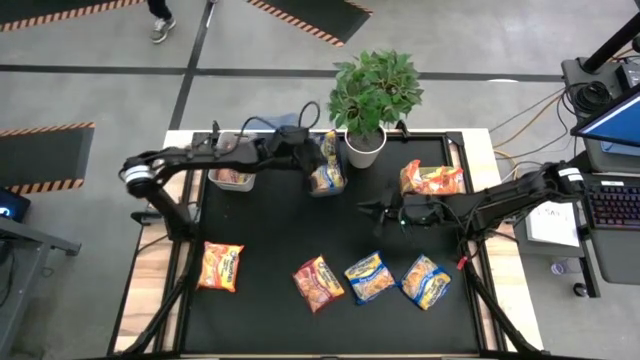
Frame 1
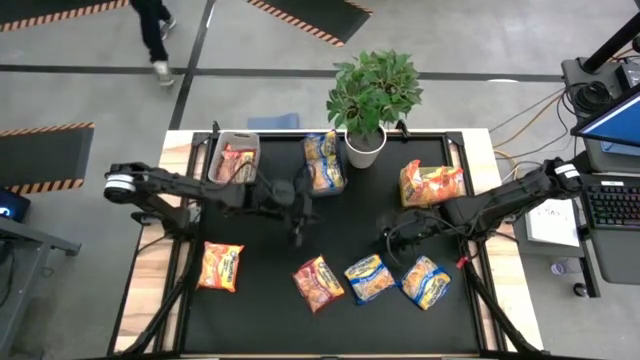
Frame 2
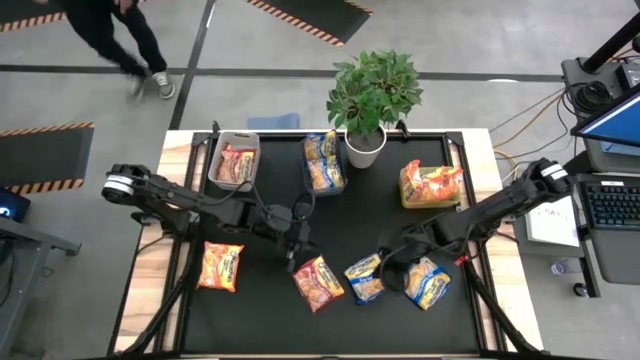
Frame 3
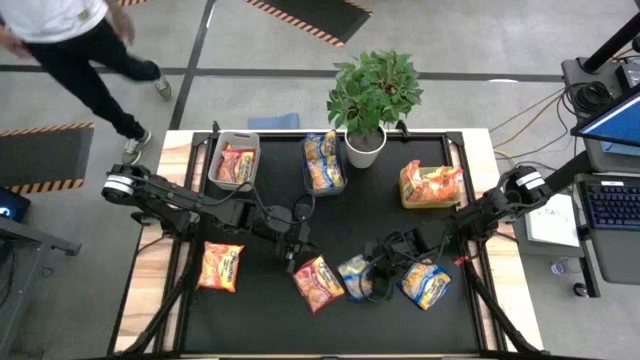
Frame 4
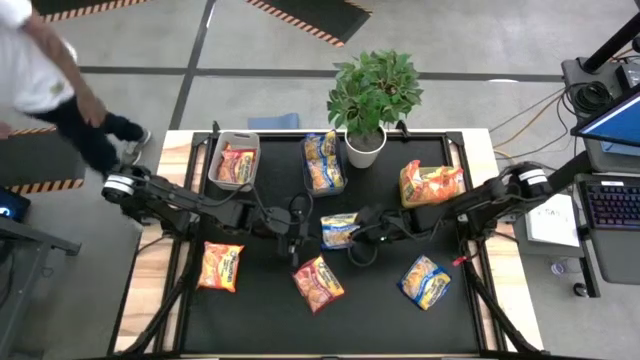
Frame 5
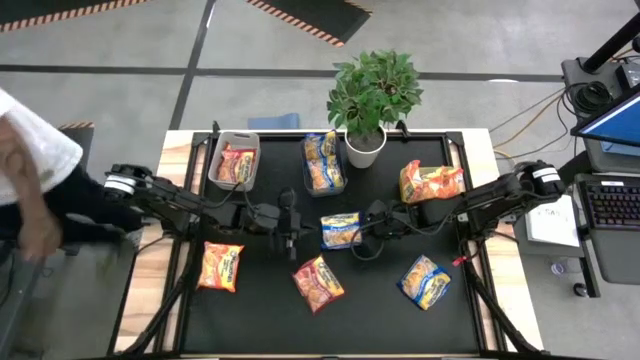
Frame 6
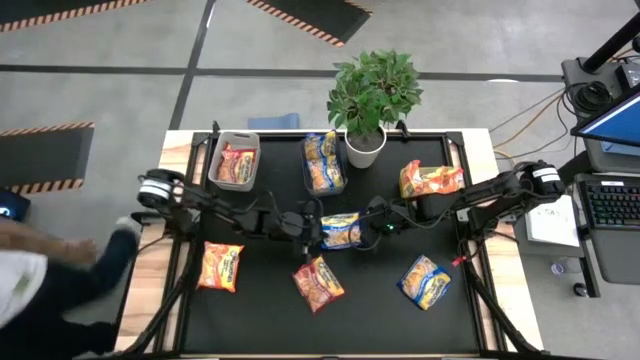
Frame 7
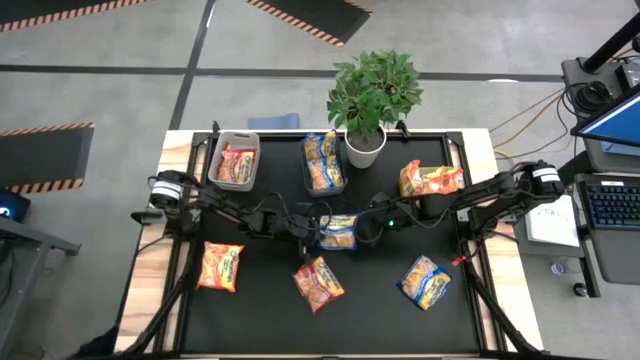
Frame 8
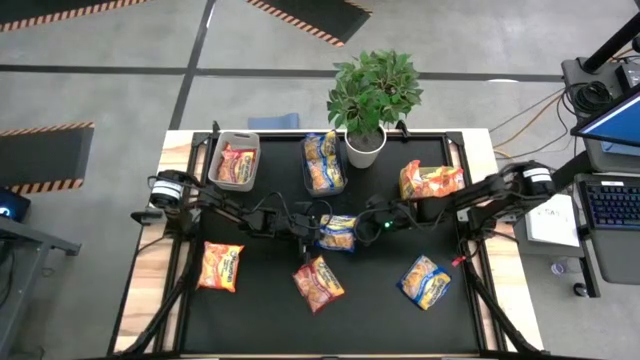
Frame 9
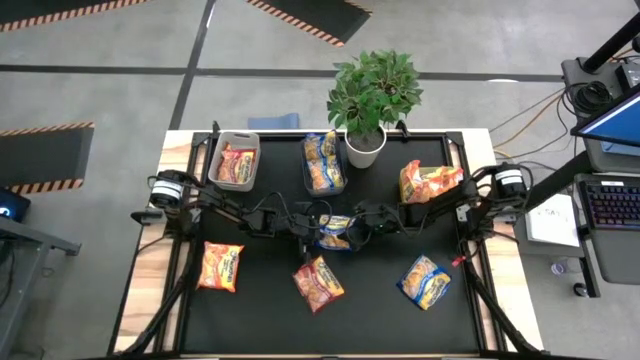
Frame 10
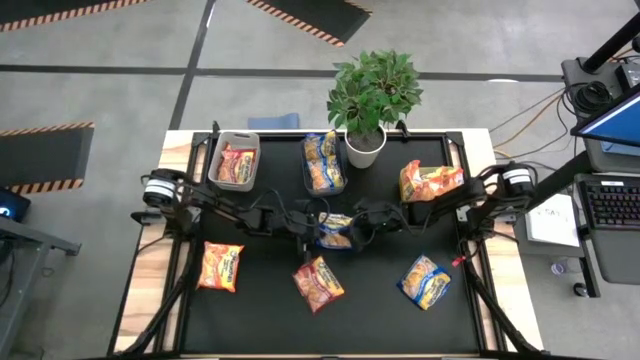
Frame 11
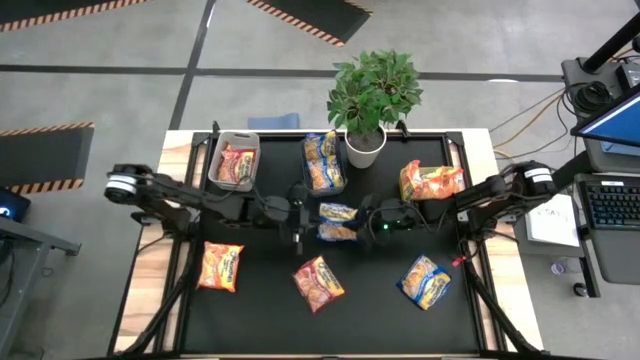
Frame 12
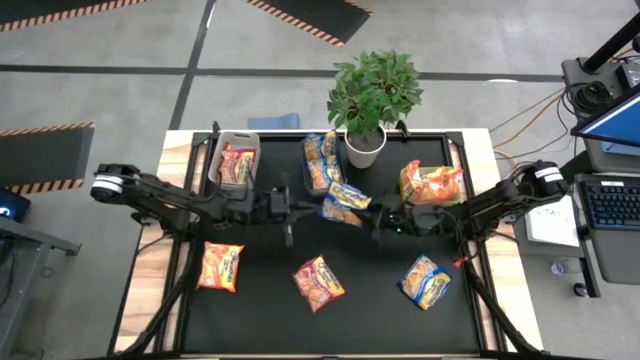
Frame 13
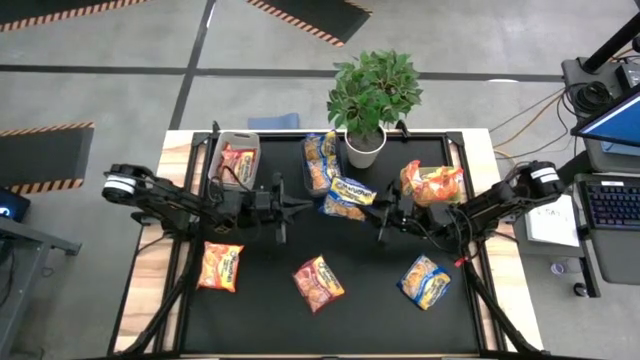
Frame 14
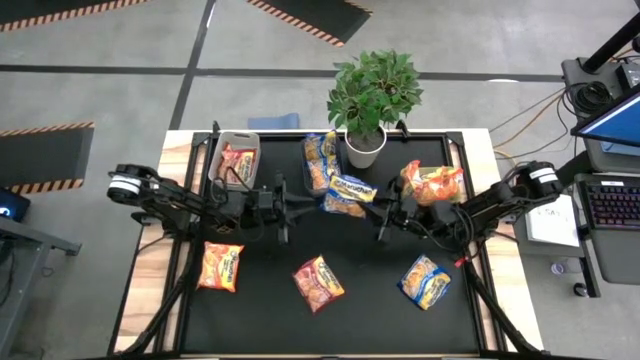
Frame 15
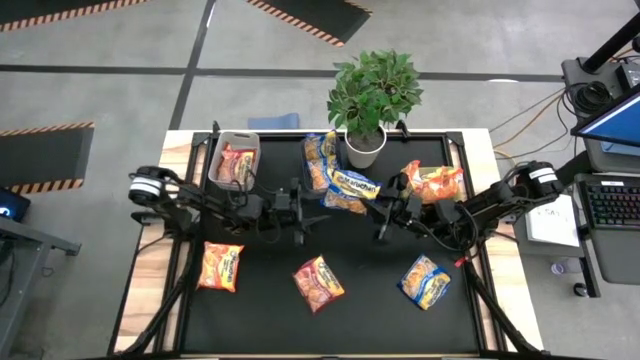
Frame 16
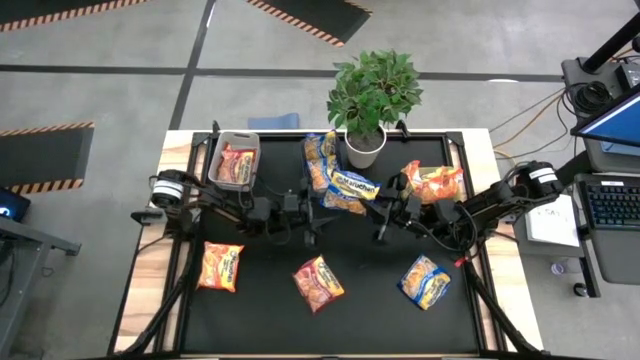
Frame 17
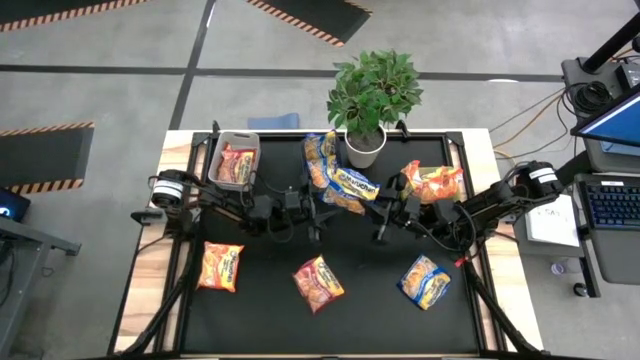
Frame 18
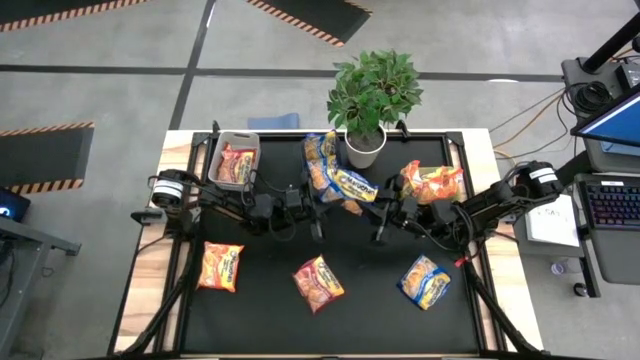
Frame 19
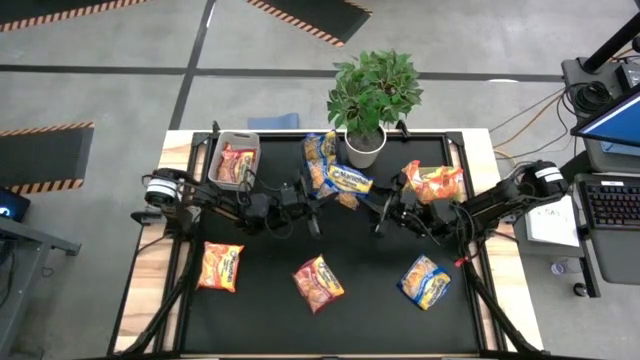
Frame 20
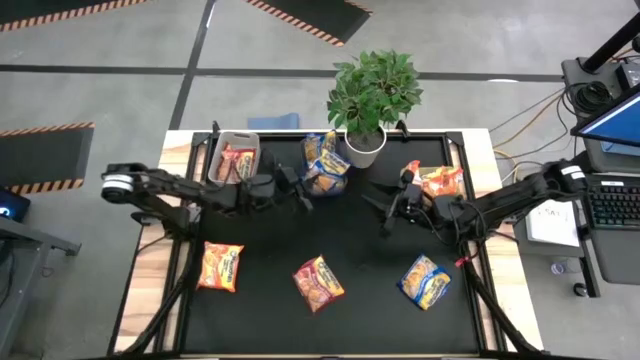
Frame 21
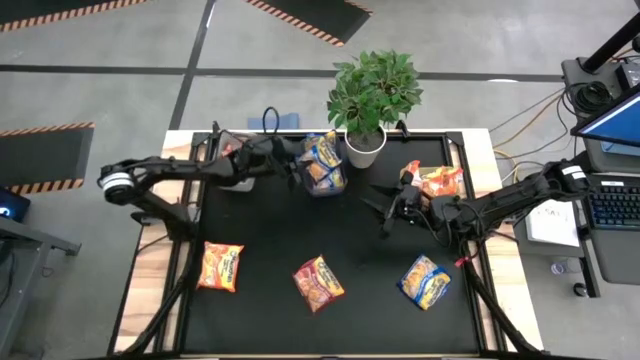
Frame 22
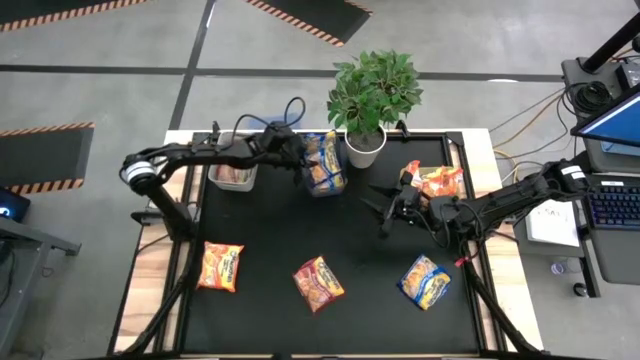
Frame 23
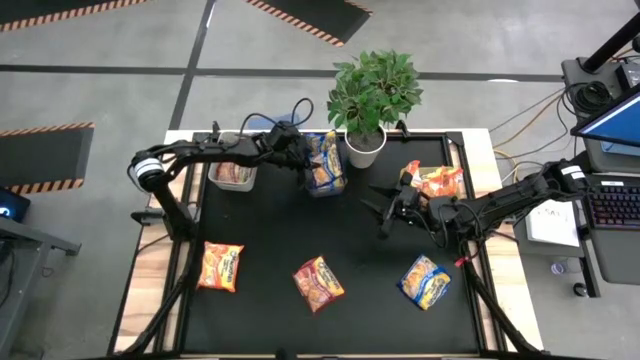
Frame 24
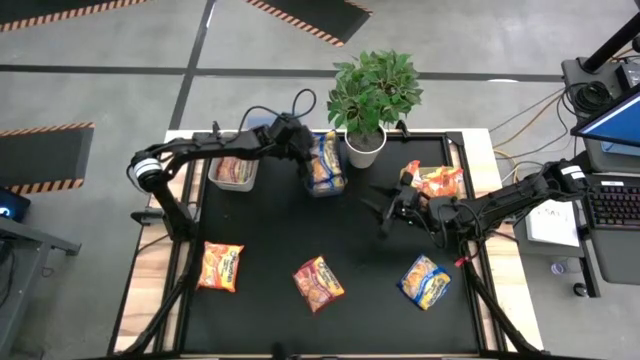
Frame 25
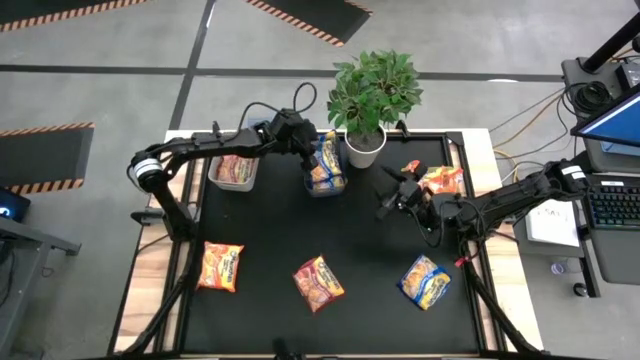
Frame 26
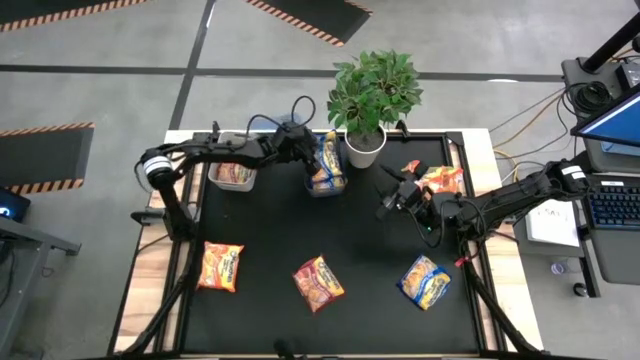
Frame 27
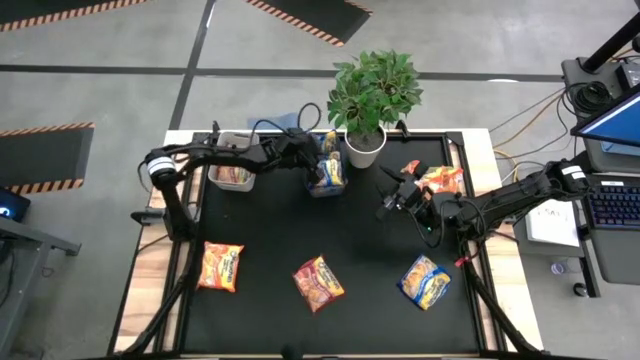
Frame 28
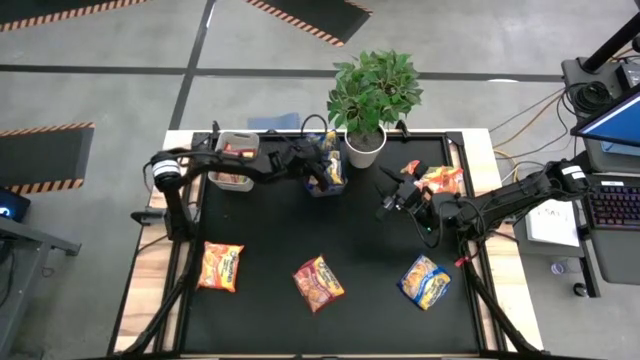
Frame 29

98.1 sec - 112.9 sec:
Task: Sort Maruchan noodles
Put the blue noodle pack into the black bin

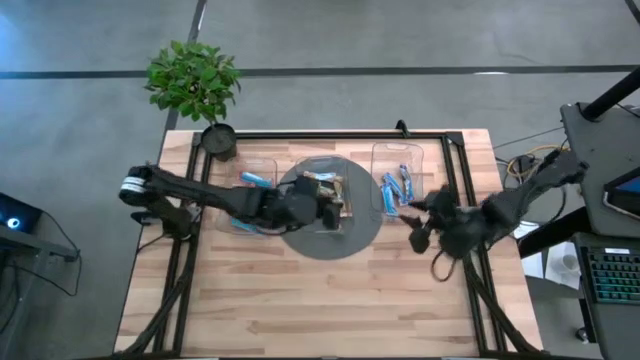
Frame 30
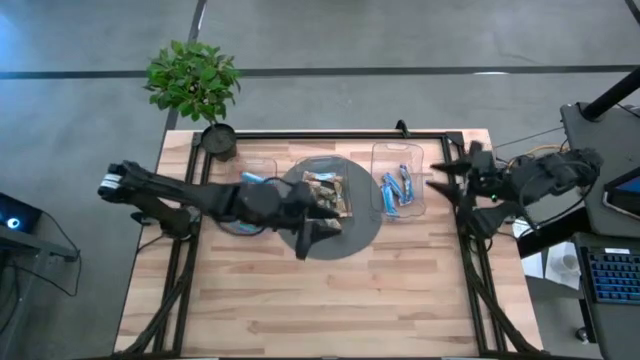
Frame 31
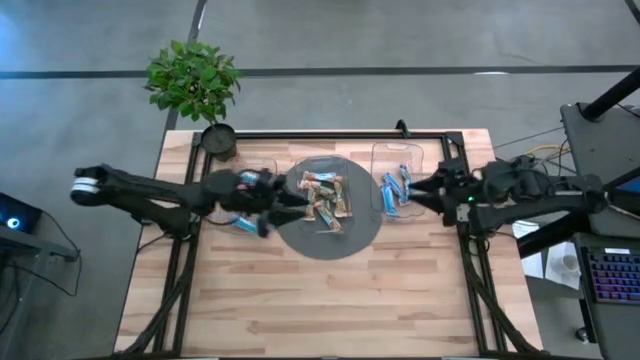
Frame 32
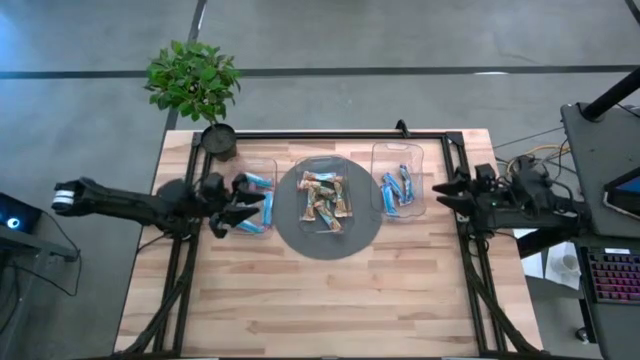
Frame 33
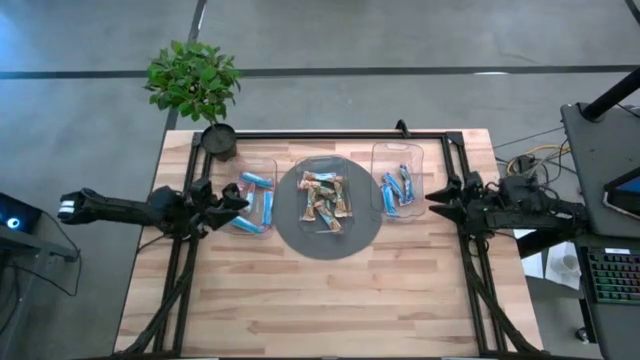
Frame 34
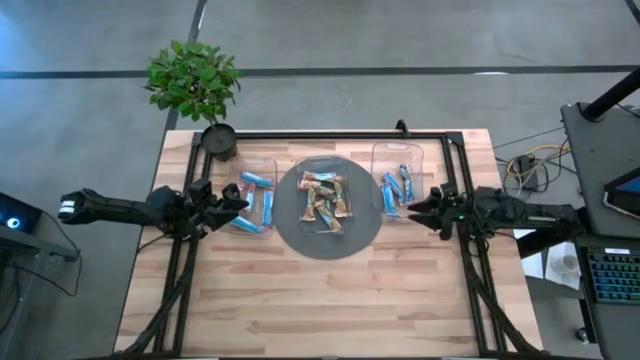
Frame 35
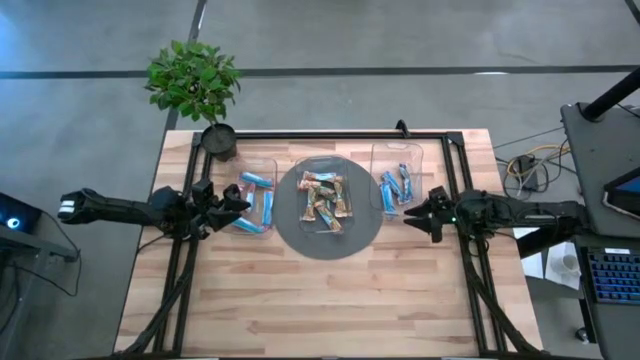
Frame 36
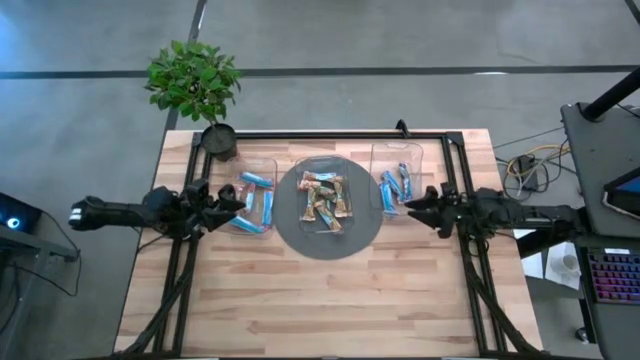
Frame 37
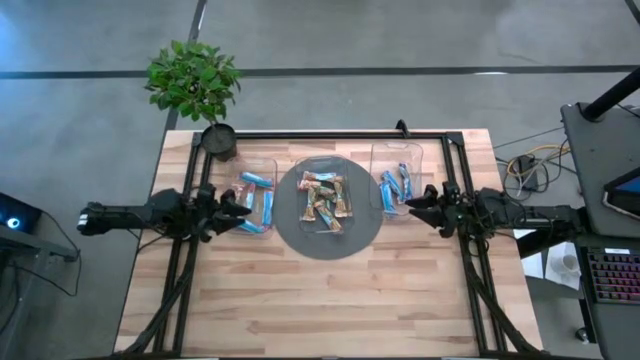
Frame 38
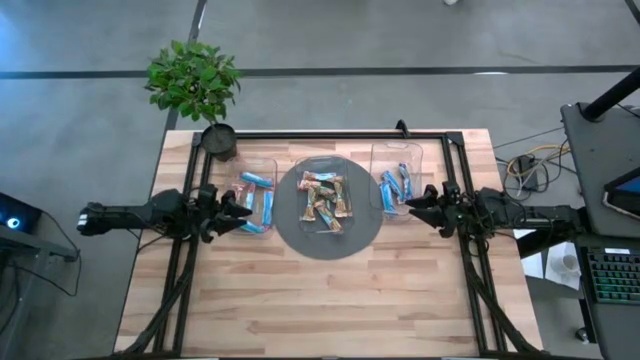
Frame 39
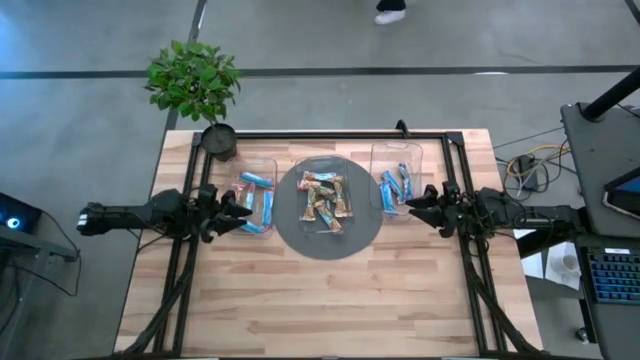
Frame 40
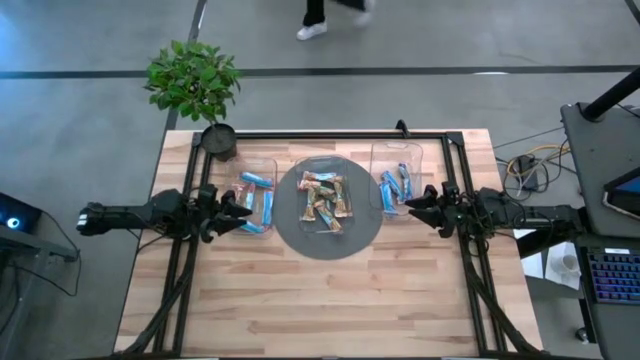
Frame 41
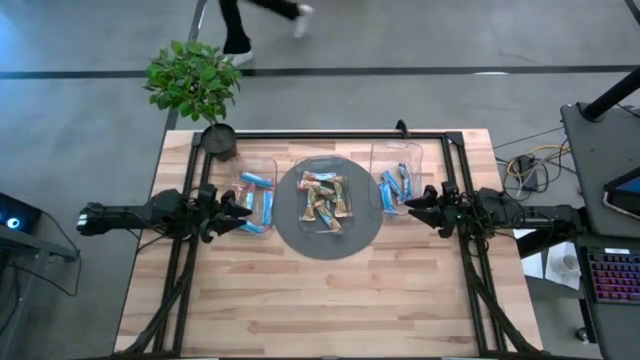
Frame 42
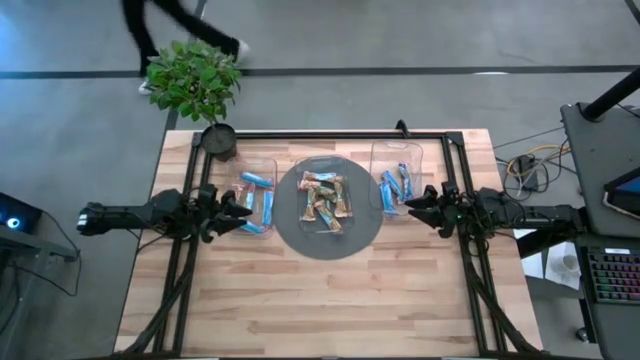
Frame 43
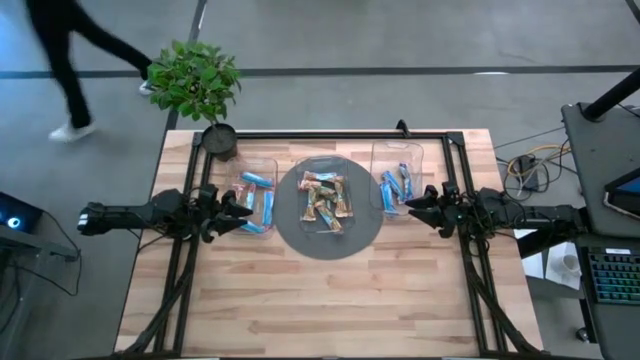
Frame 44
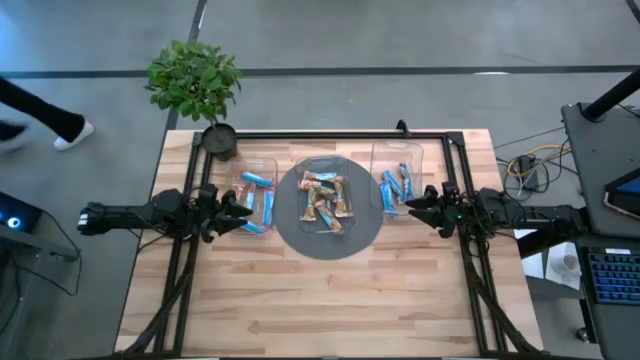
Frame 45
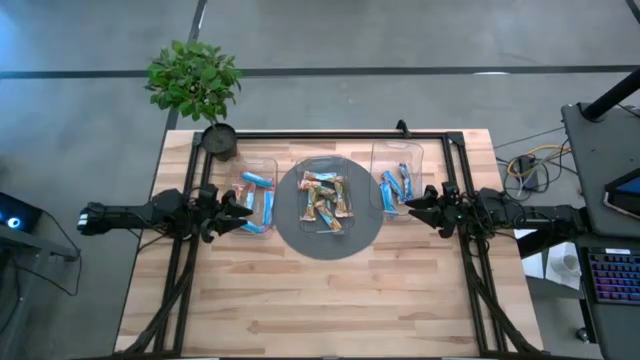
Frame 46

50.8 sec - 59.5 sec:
Task: Pick and place Granola Bars by type
Return to Home Position
